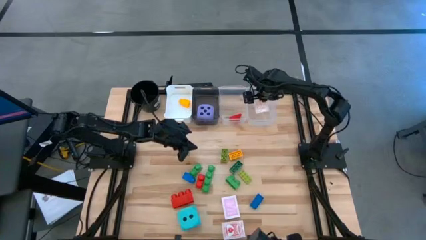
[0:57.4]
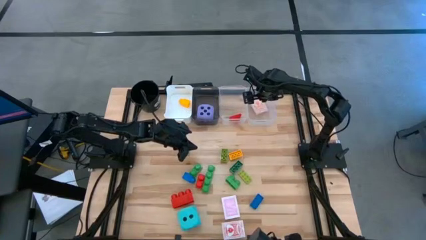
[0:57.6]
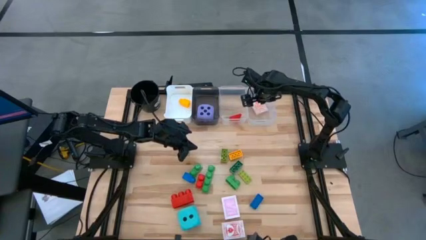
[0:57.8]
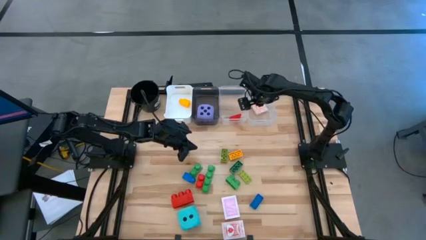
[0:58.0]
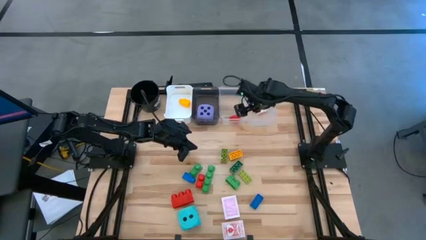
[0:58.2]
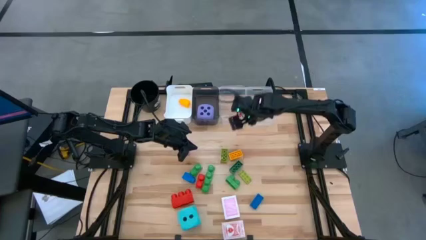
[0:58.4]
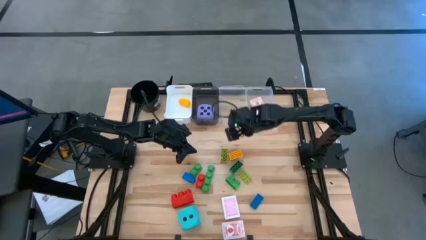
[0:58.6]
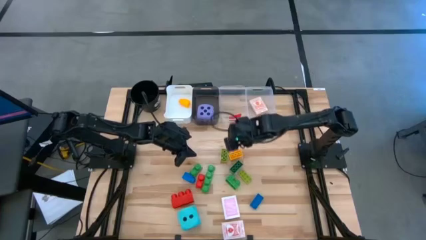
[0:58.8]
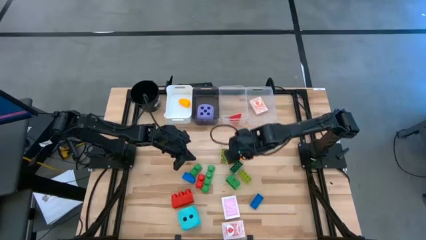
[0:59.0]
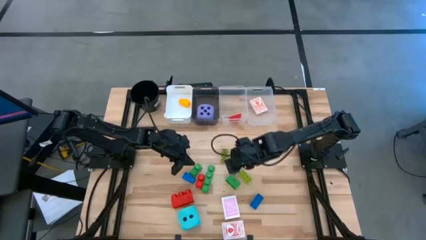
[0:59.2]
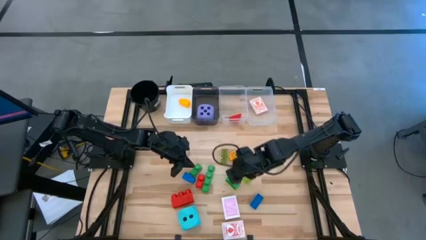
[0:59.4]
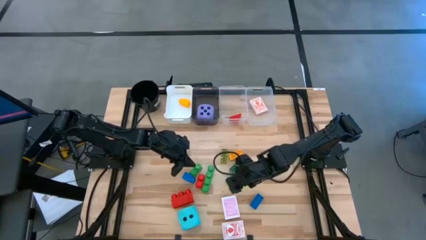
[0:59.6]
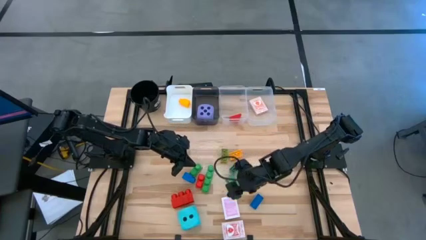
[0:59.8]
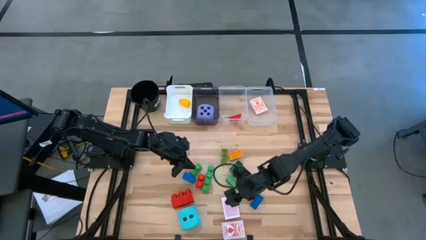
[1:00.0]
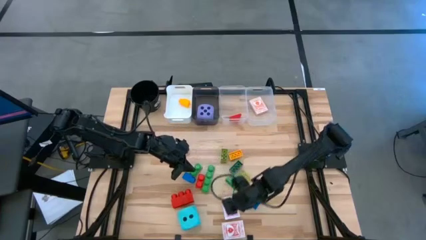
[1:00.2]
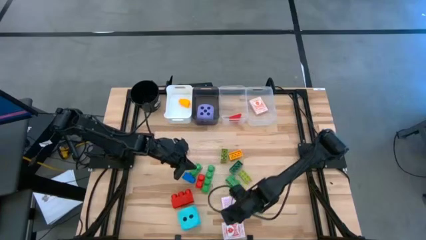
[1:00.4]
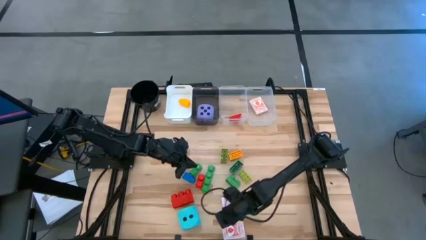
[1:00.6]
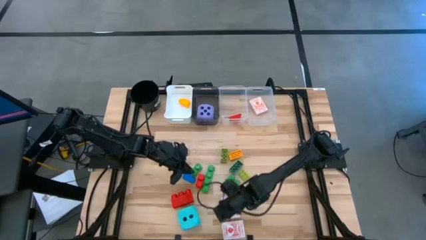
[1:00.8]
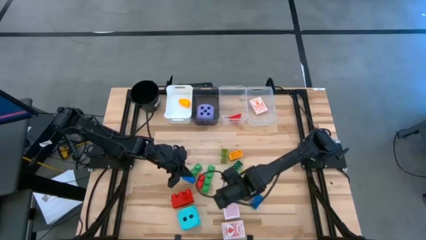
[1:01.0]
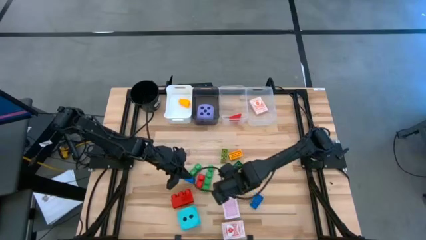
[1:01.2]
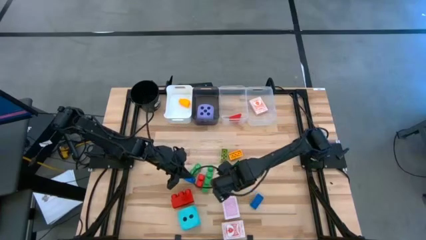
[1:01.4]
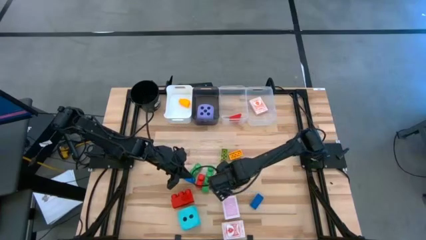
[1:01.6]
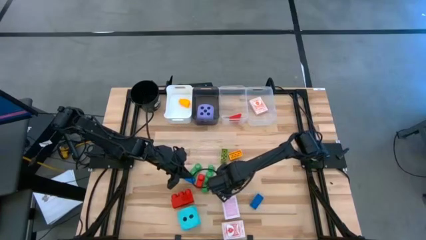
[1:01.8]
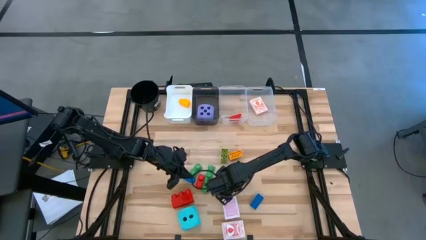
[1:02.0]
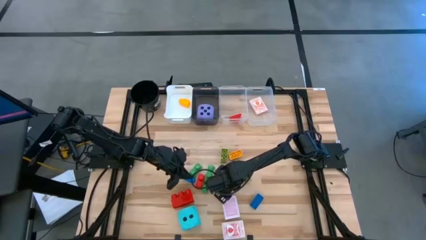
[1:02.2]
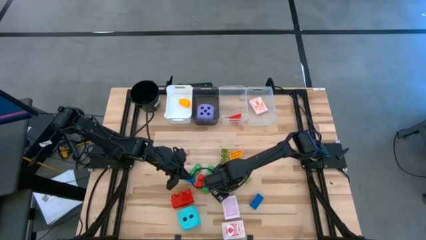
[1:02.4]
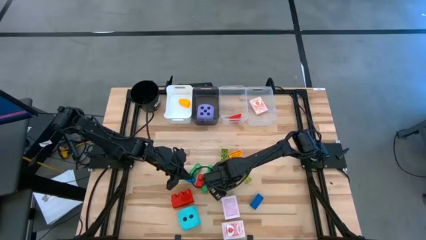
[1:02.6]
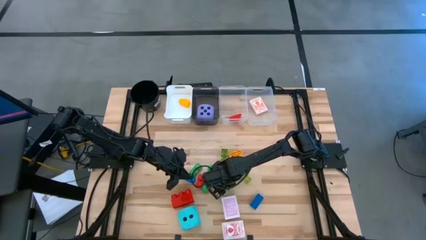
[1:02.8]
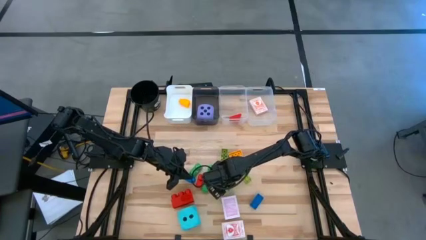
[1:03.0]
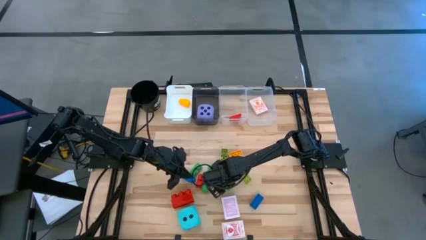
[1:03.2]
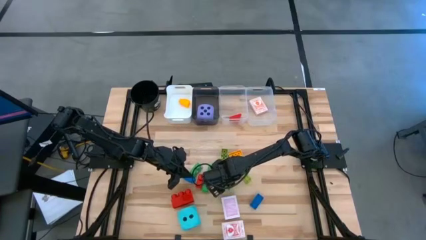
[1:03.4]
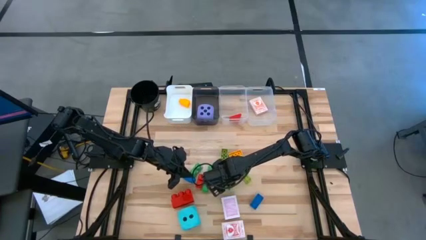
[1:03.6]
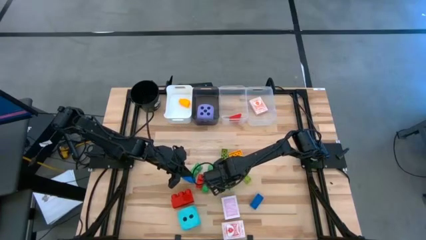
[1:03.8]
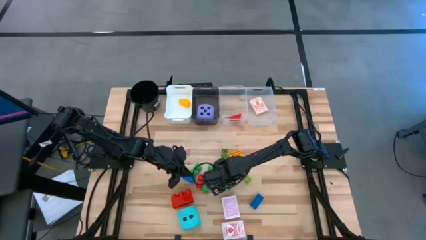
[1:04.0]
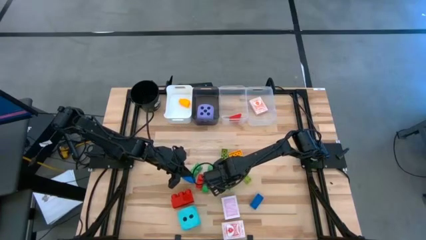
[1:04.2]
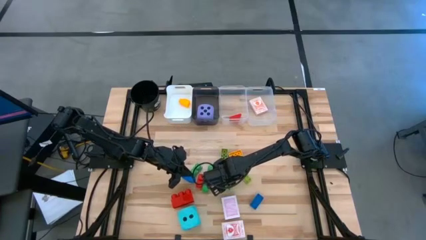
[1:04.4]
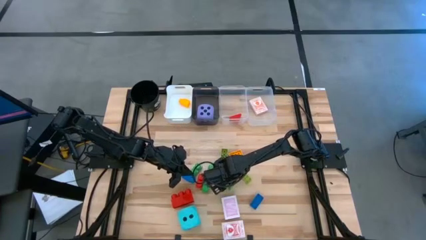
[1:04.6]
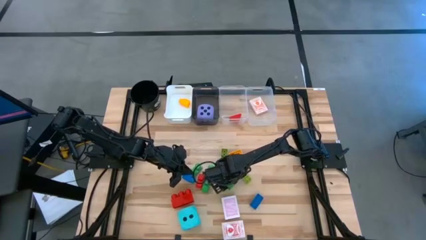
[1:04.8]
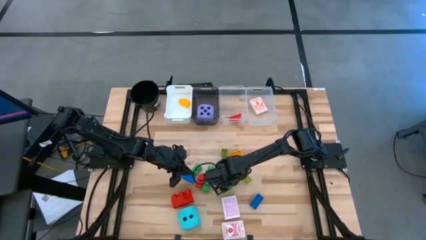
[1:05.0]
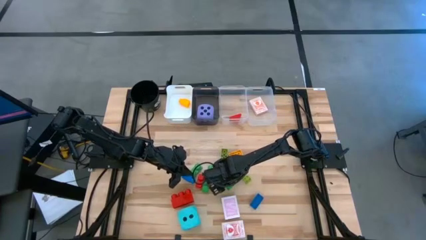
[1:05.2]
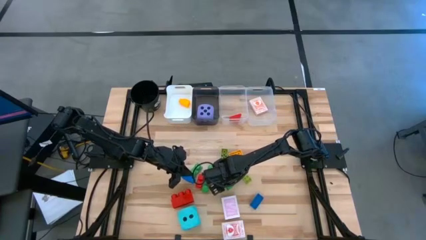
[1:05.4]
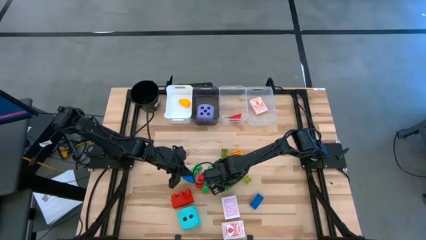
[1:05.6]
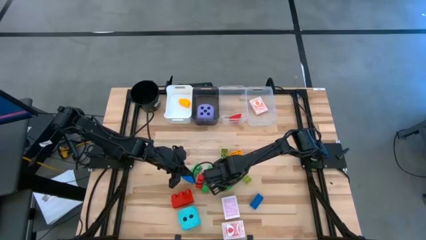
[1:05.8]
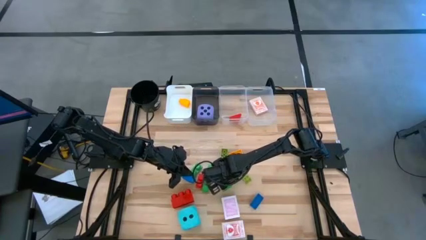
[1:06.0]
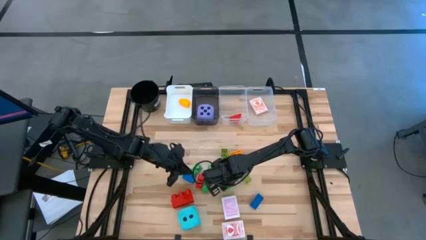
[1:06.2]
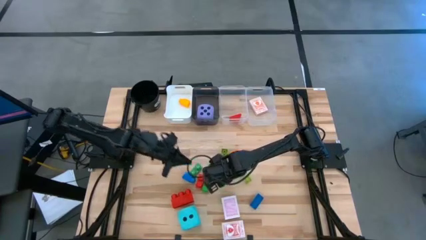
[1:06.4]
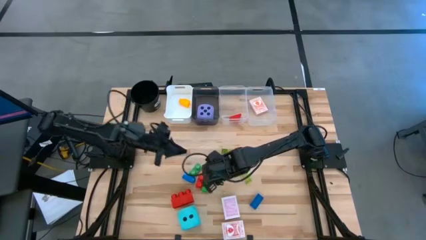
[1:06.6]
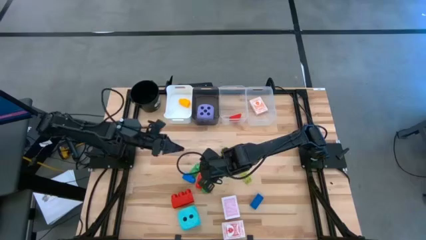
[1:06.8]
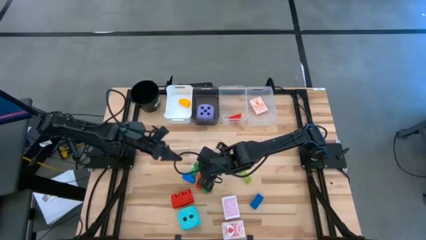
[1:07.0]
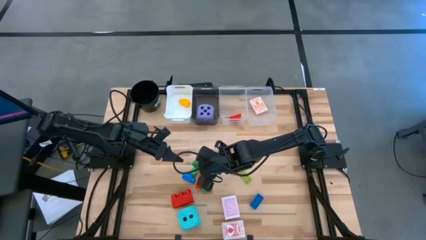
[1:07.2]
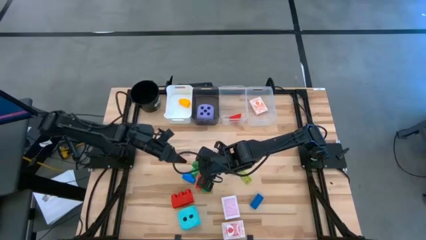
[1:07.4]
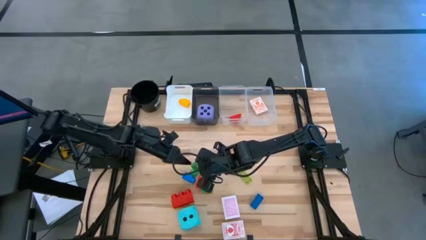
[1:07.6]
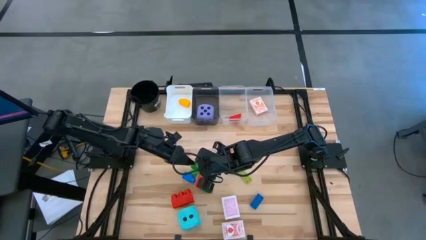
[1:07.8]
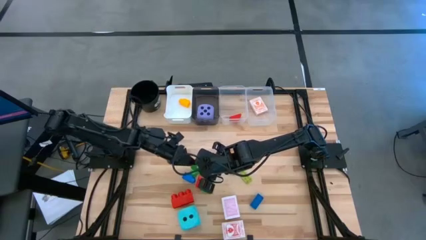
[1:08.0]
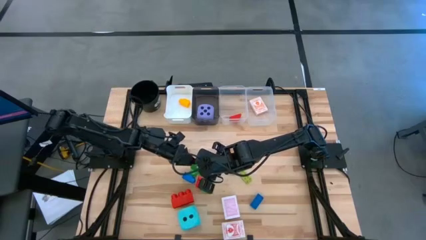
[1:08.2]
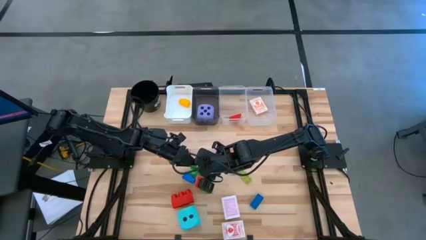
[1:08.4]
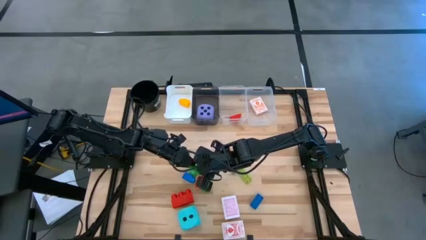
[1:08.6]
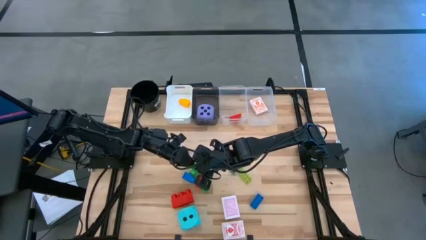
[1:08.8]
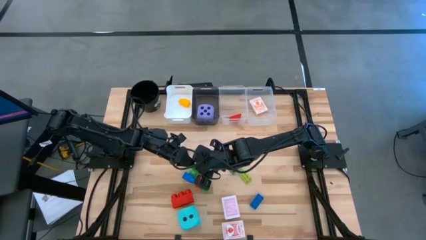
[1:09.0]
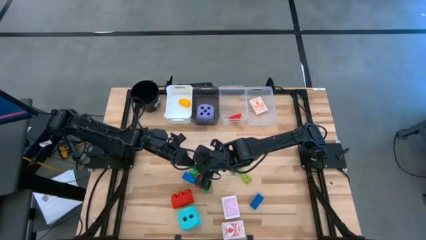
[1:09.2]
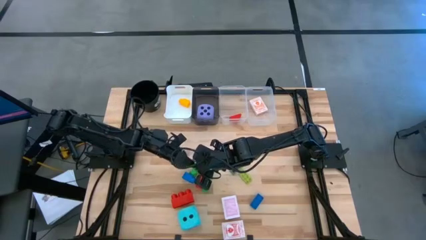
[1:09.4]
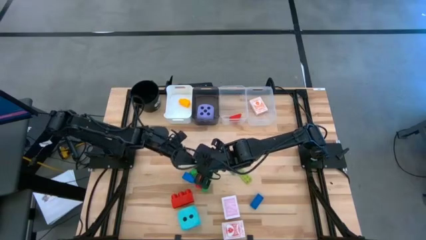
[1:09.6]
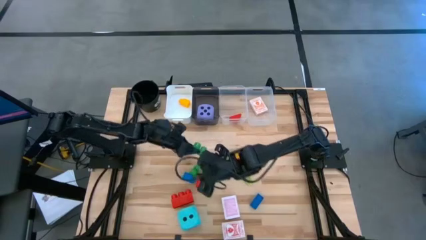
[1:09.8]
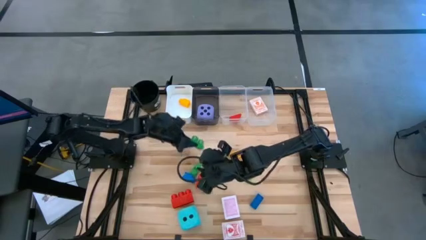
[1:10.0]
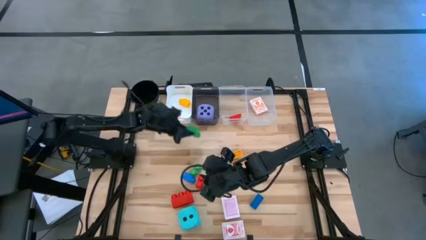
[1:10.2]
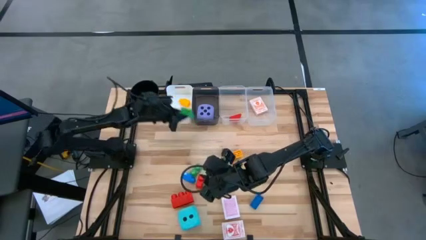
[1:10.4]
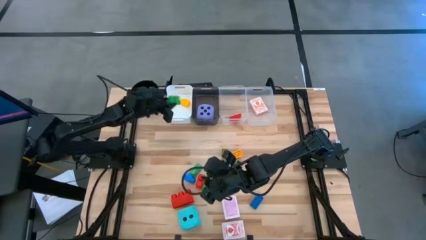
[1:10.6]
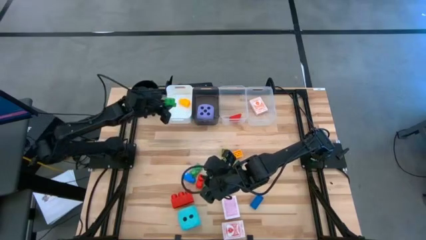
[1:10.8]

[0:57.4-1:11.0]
Task: Pick & Place Toys
Put the big green 2-stud game piece into the white bin

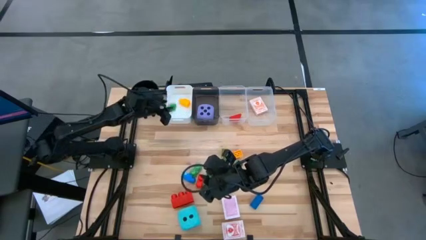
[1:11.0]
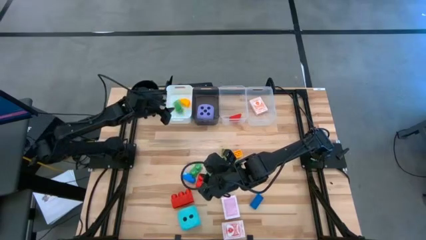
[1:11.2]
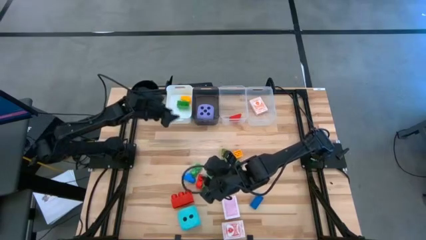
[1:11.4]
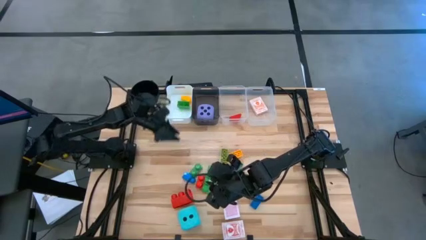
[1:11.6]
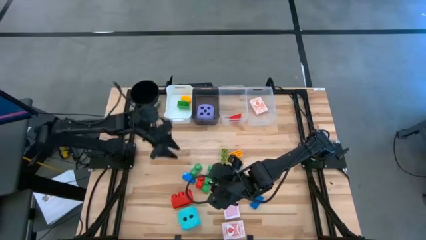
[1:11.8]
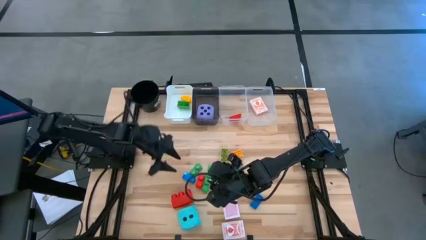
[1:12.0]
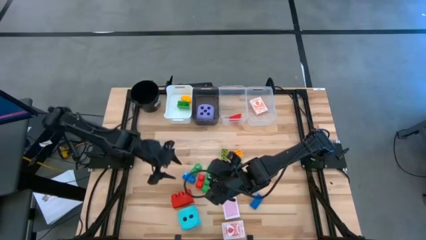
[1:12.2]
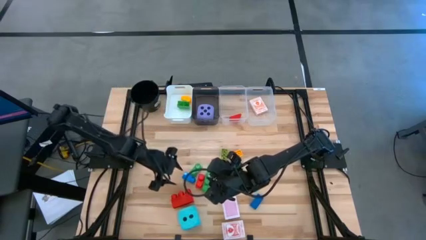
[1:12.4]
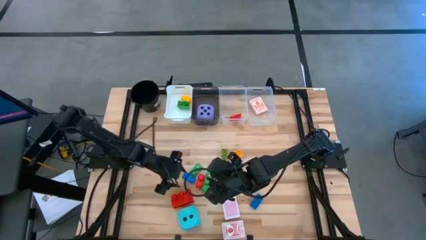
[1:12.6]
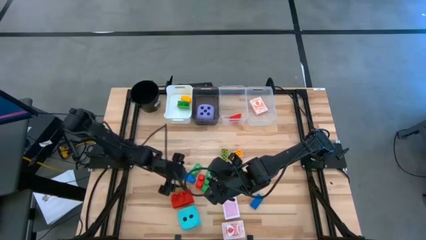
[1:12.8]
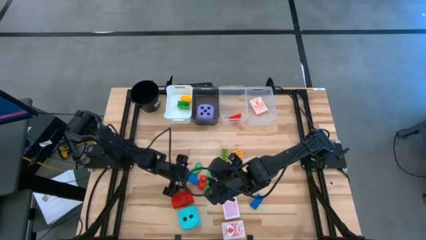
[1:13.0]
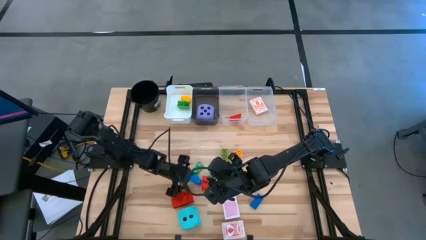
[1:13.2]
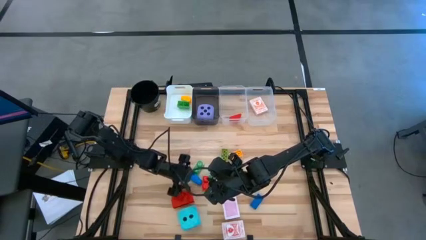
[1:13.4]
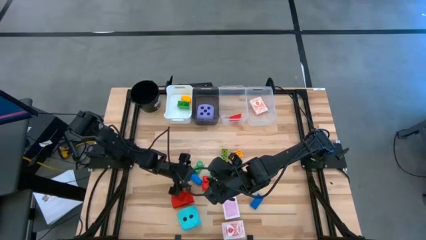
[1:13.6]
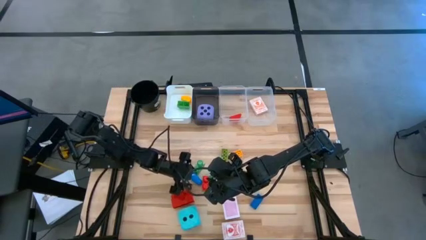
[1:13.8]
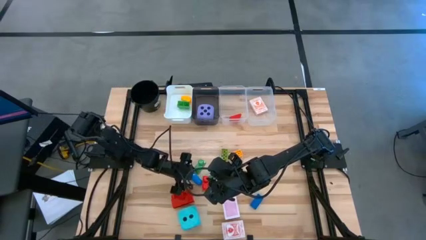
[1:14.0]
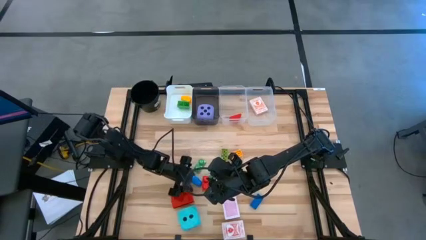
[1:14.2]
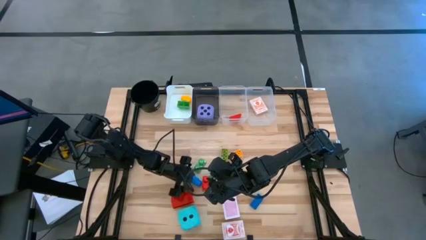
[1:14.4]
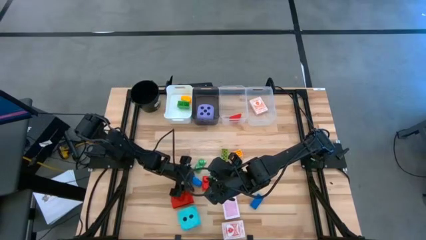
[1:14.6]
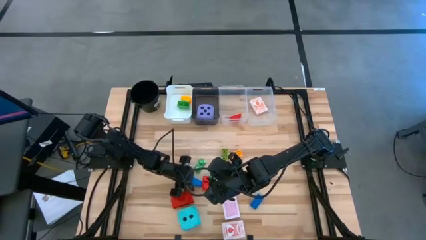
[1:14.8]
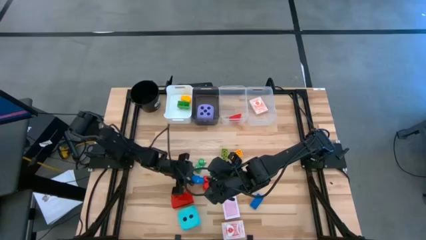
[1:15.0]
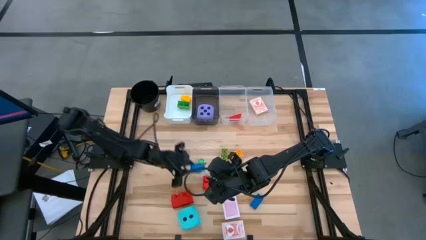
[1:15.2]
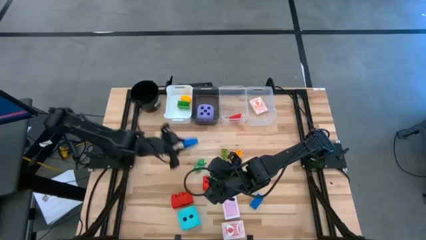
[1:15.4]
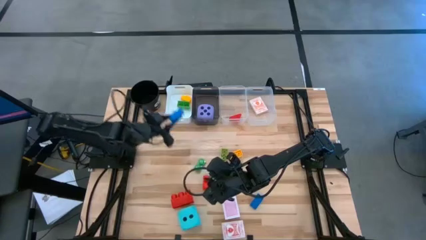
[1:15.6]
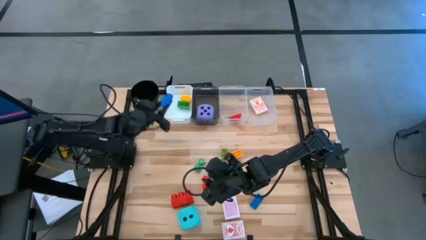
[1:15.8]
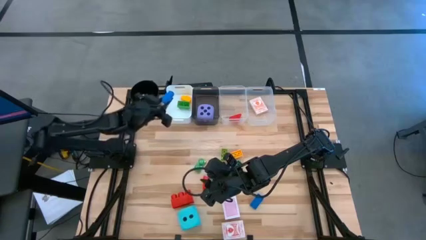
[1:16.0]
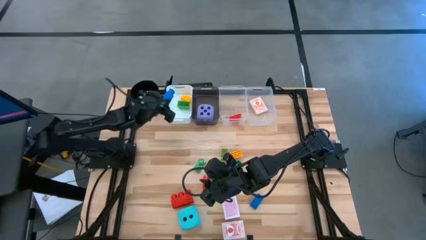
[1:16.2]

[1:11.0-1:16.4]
Put the big blue 1-stud game piece into the white bin
